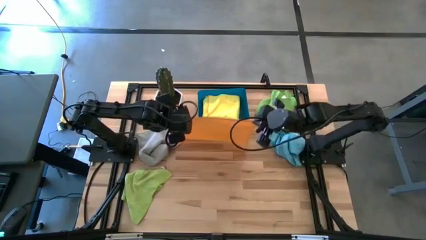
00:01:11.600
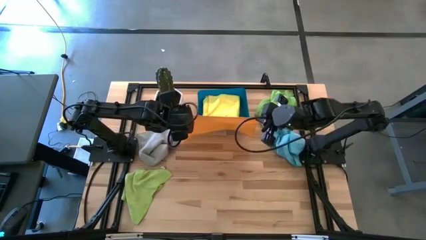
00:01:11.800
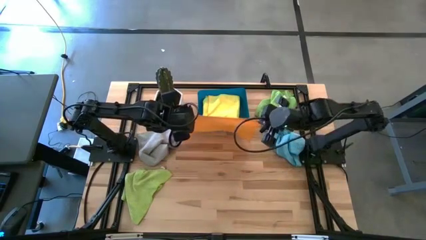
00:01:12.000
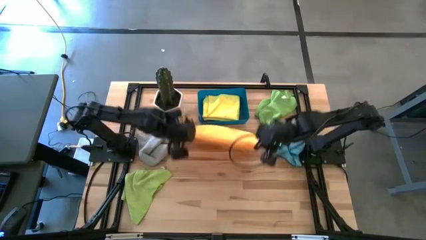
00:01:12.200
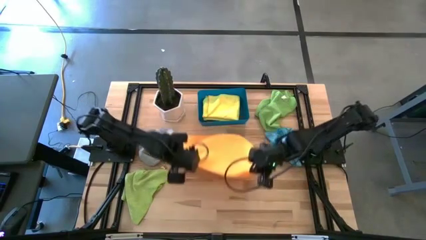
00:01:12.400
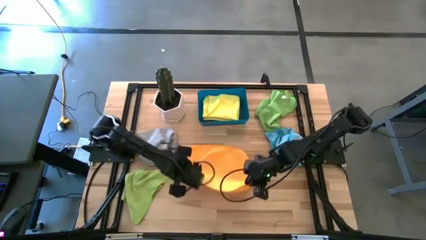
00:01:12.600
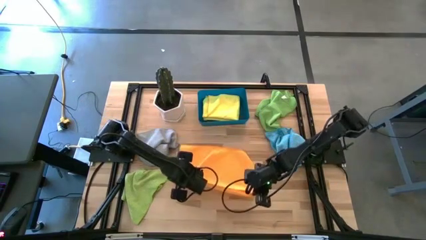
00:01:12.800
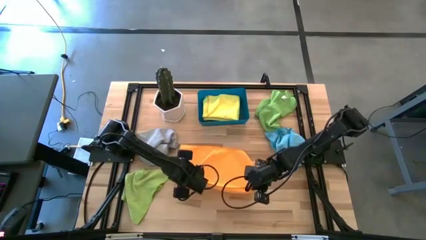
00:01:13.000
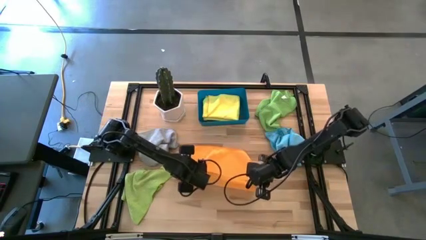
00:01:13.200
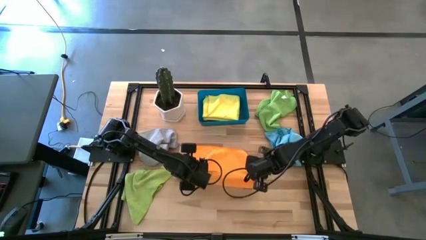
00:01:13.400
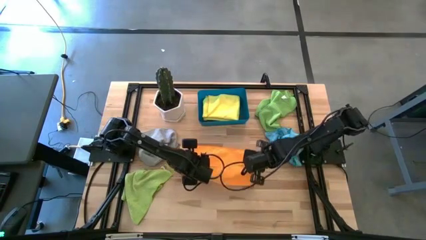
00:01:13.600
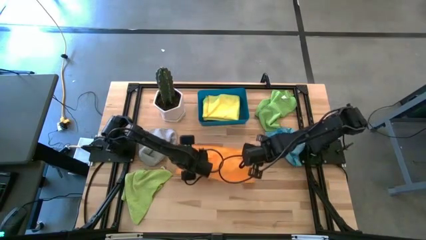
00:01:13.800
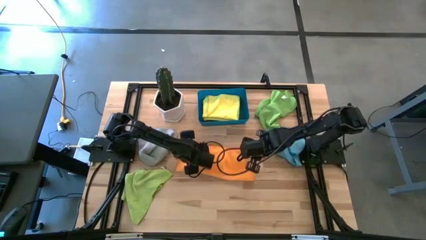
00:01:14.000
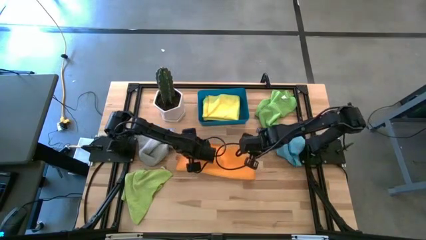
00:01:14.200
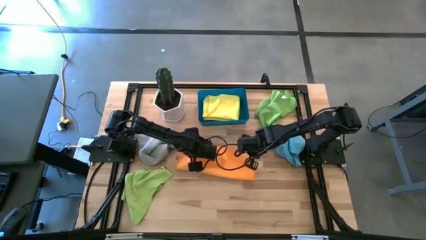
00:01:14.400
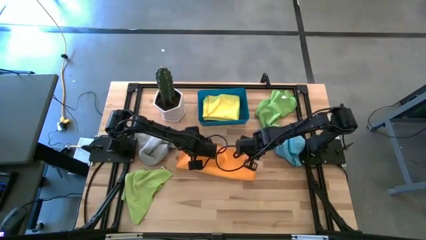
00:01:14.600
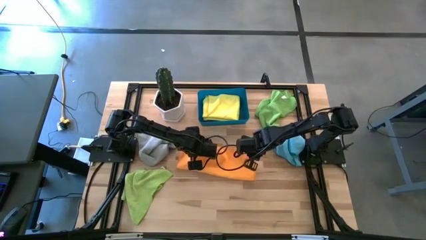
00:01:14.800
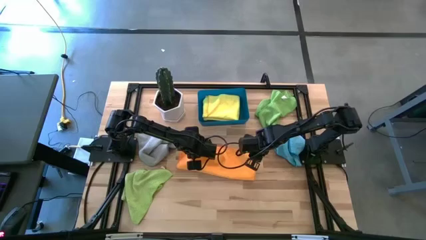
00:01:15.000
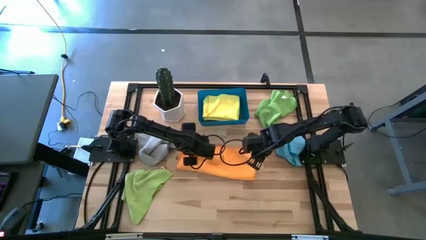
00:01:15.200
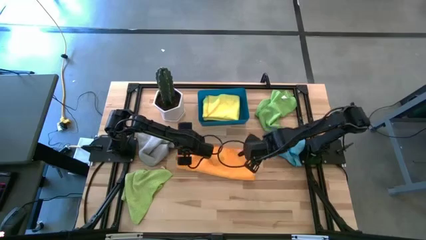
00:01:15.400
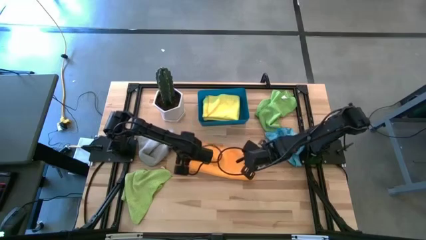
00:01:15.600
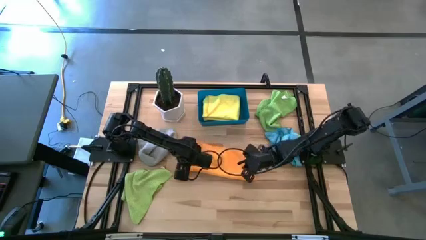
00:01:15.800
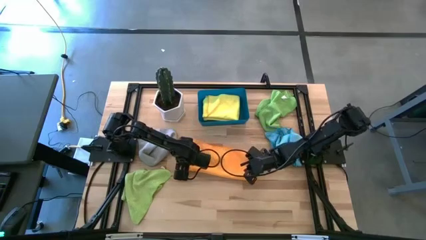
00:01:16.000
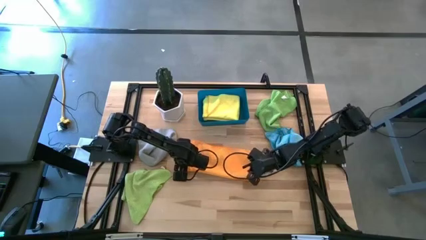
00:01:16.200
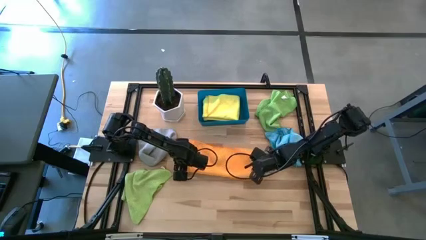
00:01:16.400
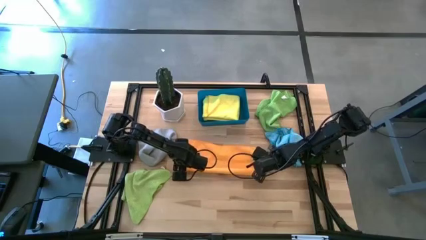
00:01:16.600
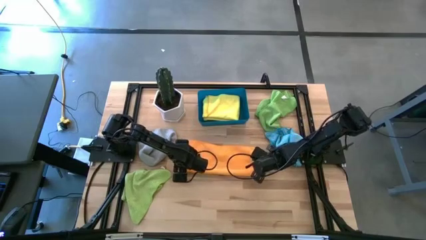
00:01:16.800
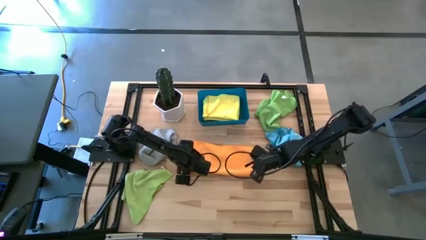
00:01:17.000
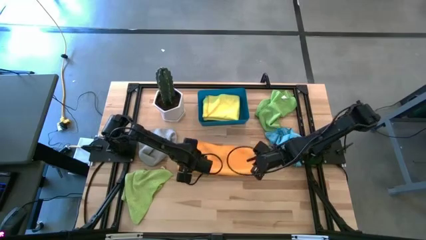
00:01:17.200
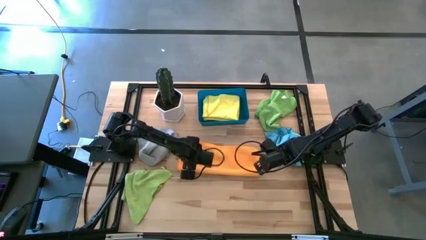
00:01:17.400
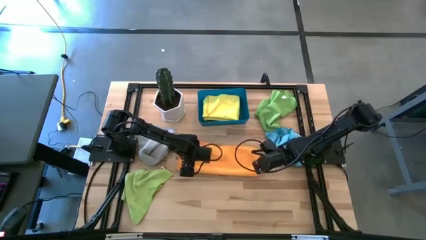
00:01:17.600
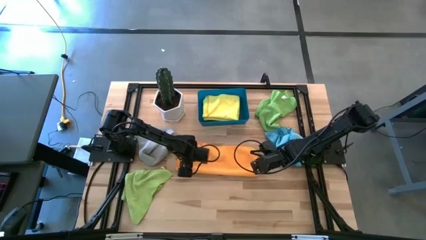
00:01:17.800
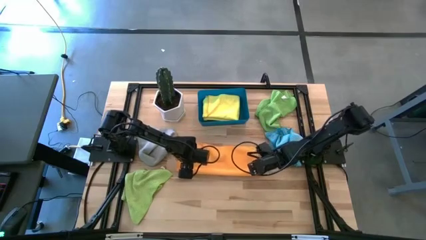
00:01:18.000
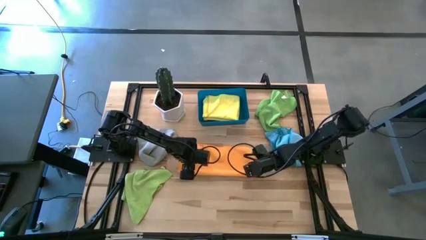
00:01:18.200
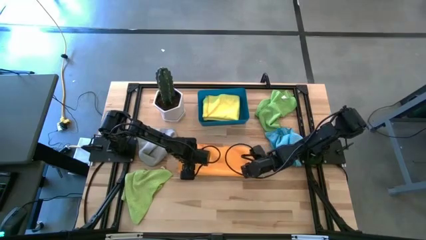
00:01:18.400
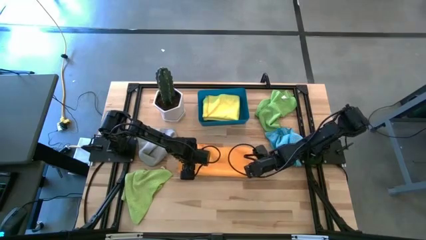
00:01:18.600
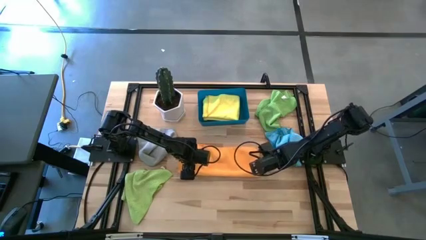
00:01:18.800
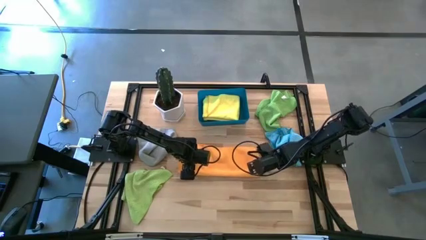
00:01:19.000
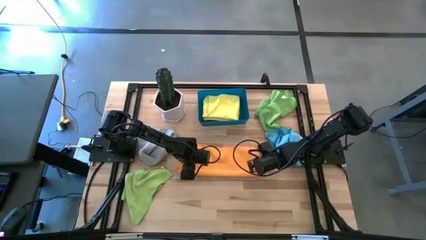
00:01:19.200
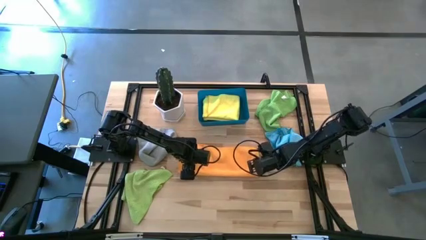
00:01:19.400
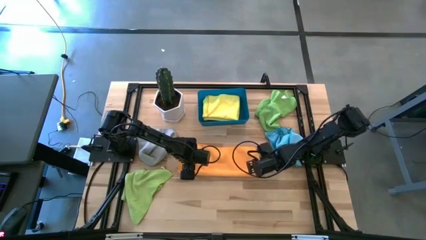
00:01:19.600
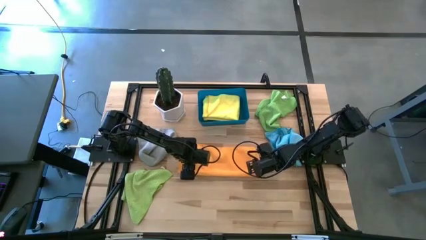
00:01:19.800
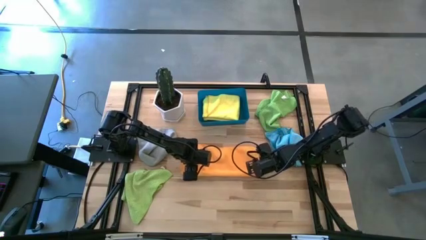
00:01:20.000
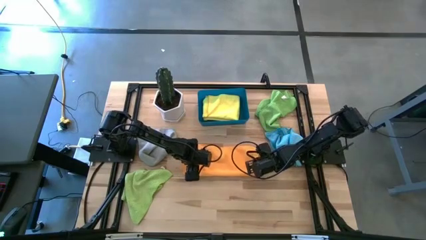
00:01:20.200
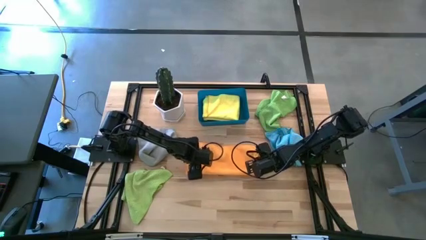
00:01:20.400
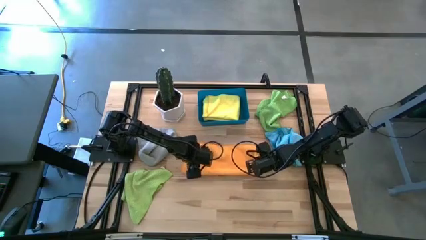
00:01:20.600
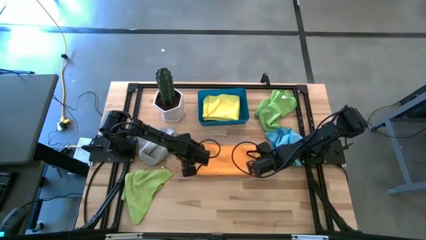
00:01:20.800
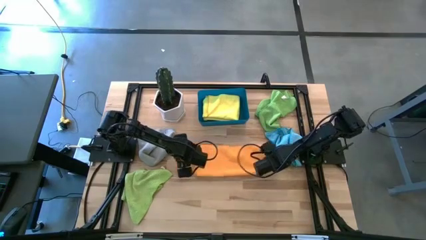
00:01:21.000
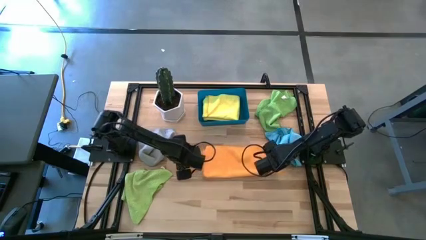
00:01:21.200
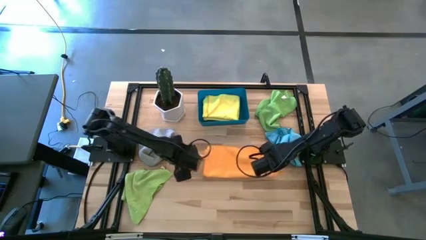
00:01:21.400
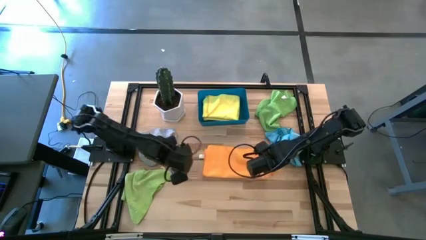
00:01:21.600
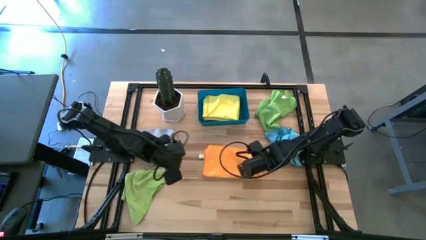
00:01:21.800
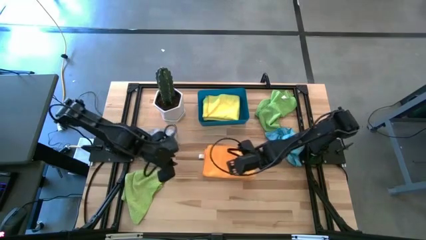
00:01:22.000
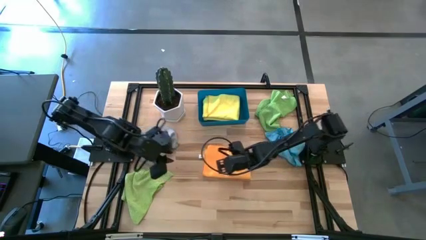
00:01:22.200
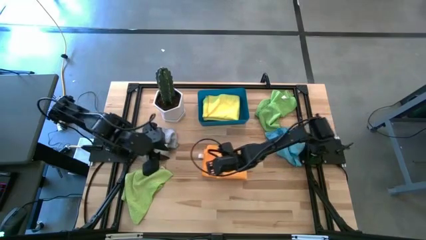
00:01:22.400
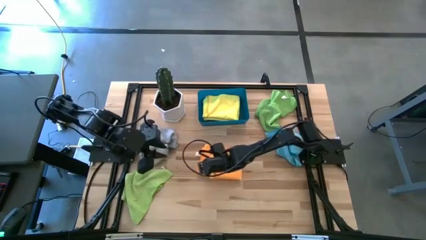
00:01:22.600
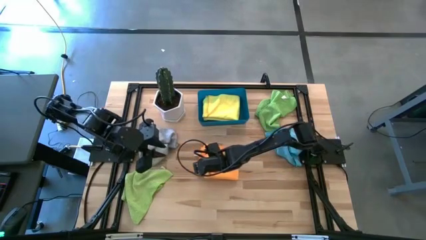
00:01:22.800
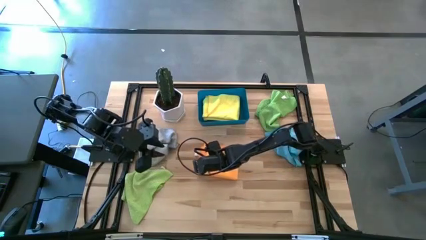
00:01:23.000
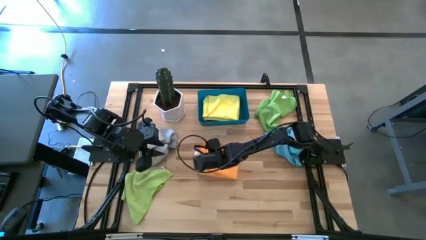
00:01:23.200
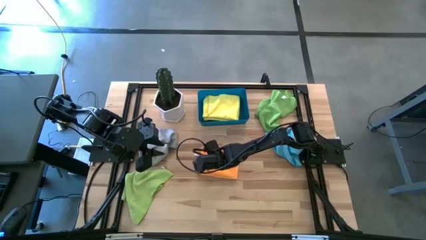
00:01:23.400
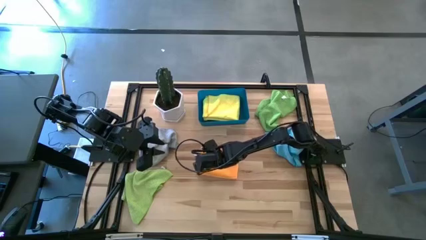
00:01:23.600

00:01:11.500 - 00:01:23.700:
Task: Fold microfiber towels
Fold the orange microfiber towel

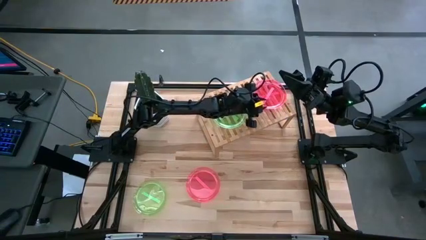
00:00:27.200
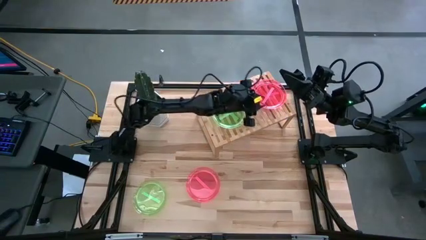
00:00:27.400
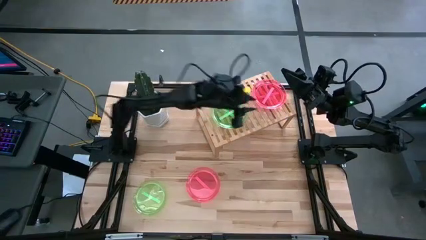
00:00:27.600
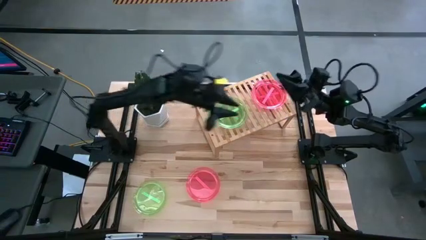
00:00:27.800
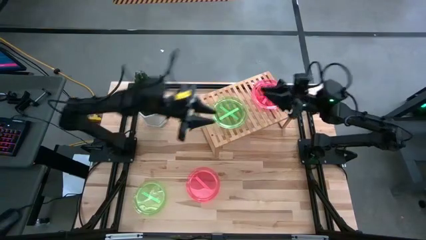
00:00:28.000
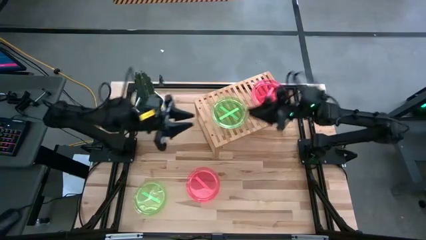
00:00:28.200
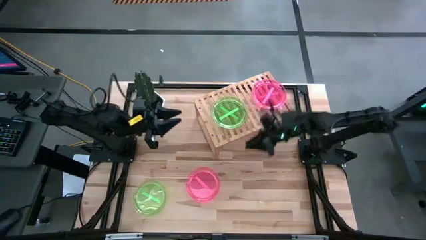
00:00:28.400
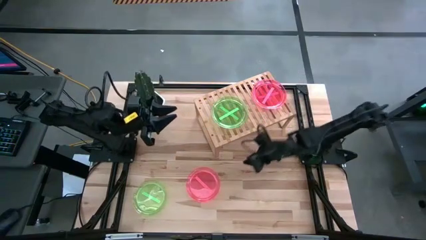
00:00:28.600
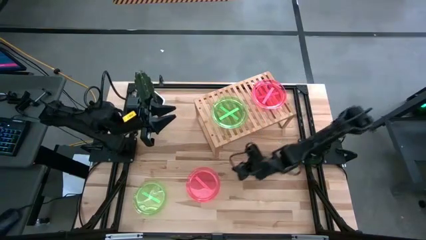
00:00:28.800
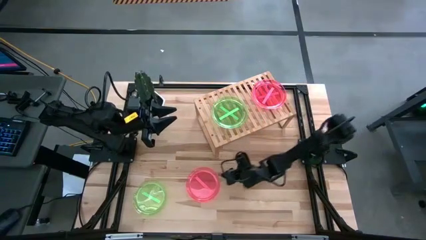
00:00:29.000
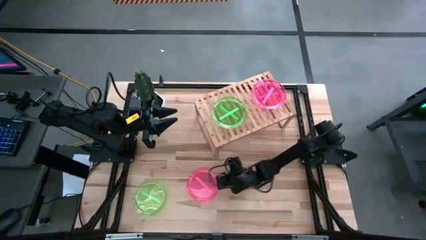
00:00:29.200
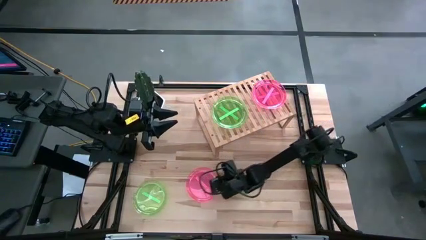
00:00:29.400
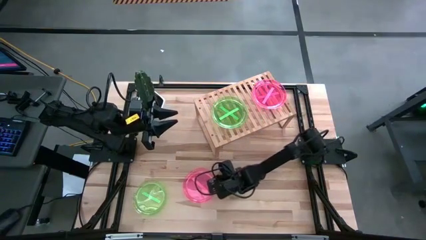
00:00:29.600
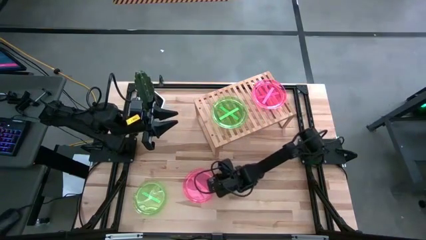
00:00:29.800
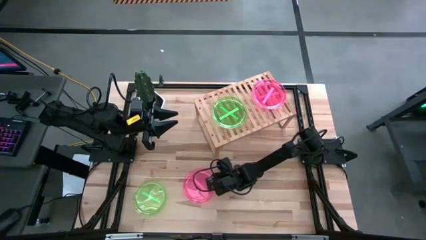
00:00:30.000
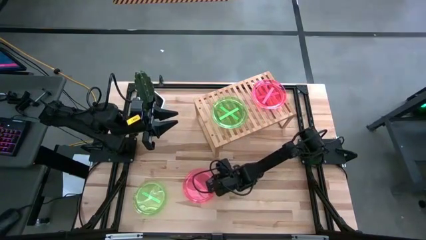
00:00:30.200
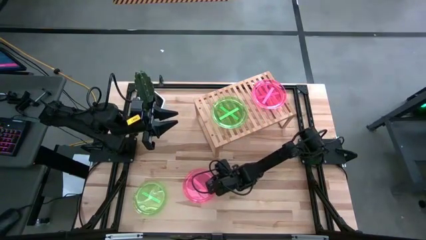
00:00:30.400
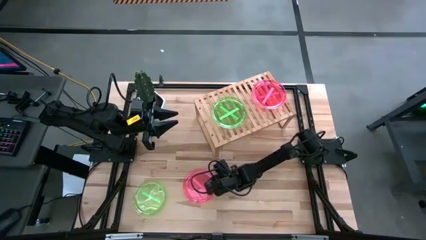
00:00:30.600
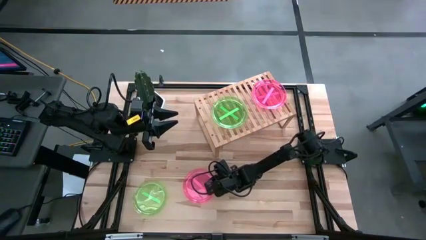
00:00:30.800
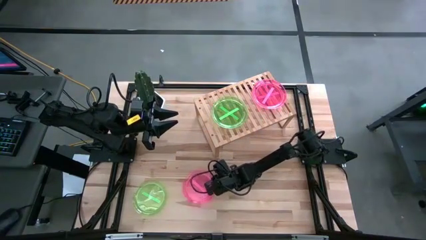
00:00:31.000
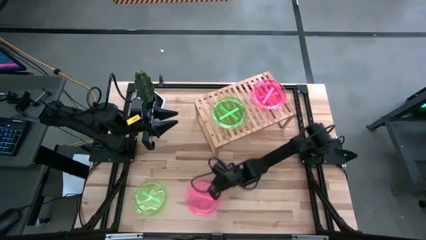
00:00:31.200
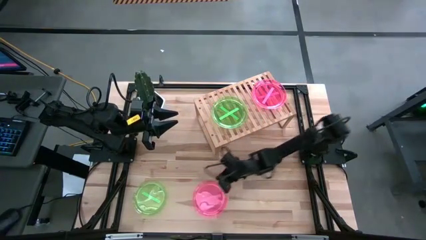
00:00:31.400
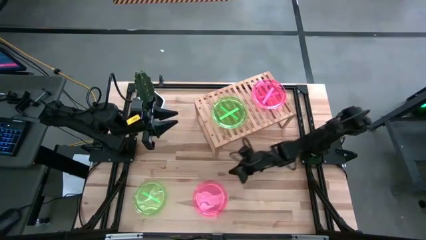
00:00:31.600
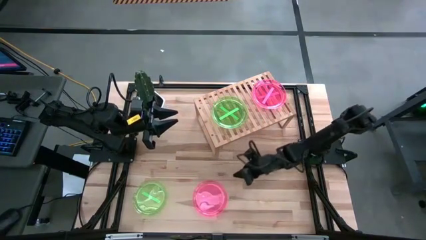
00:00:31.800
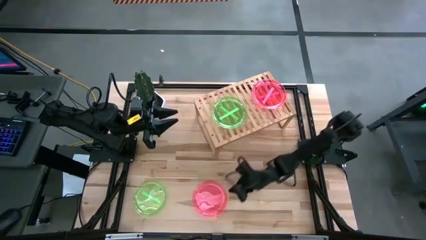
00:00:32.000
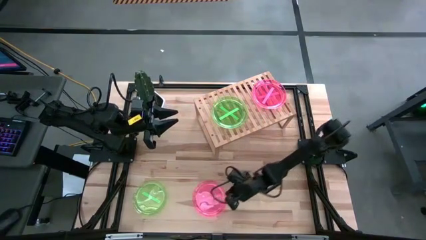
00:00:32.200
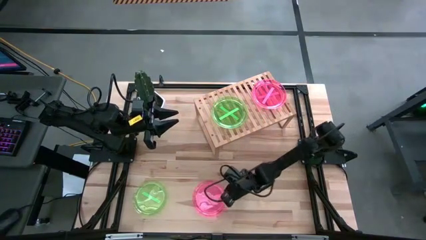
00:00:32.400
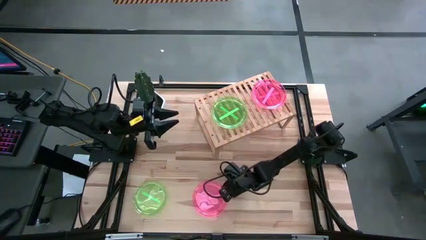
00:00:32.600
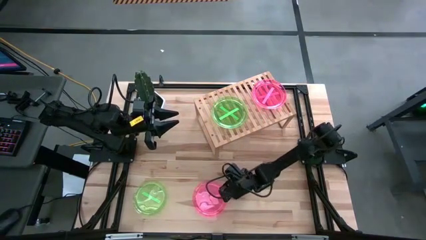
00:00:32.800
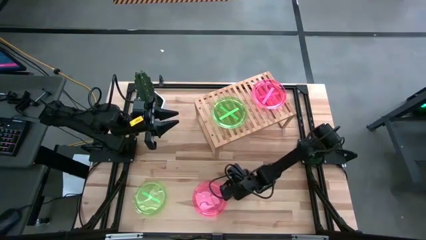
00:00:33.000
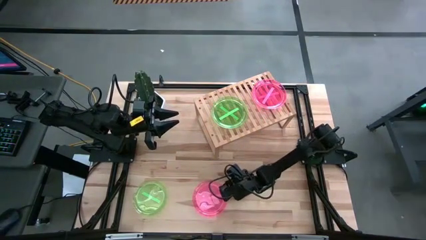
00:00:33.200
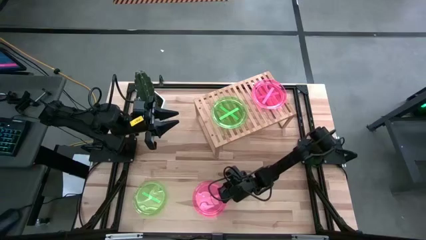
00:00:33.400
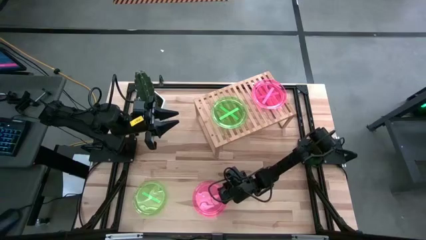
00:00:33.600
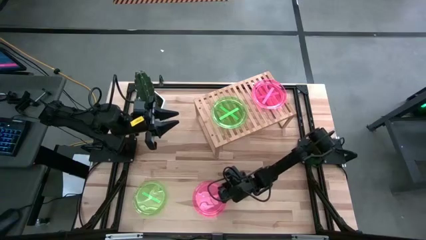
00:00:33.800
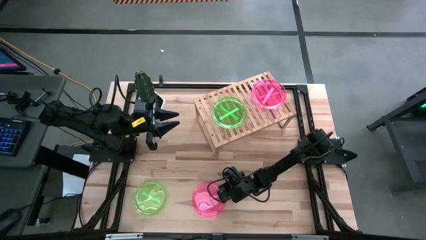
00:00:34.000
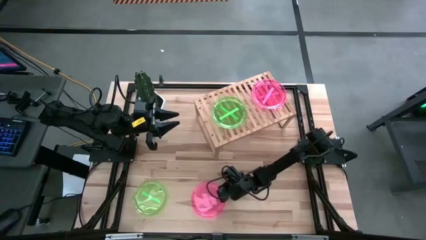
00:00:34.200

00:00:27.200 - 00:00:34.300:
Task: Place and stack plates onto a shelf
Stack the pink plate on top of the other pink plate on the shelf
